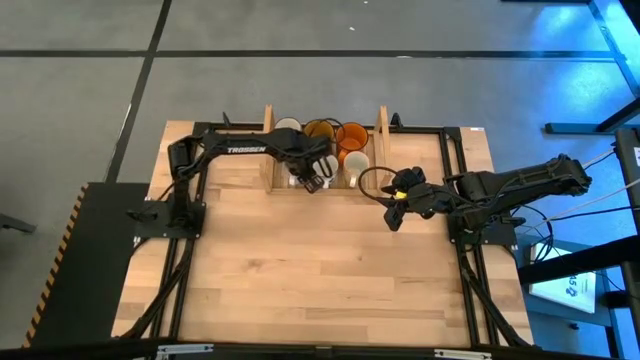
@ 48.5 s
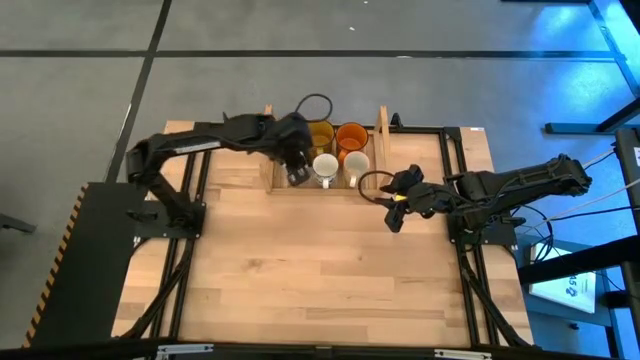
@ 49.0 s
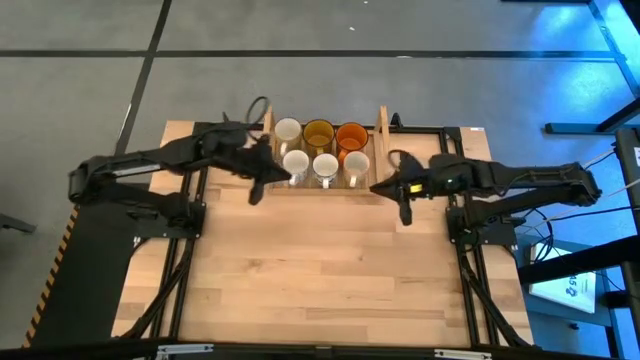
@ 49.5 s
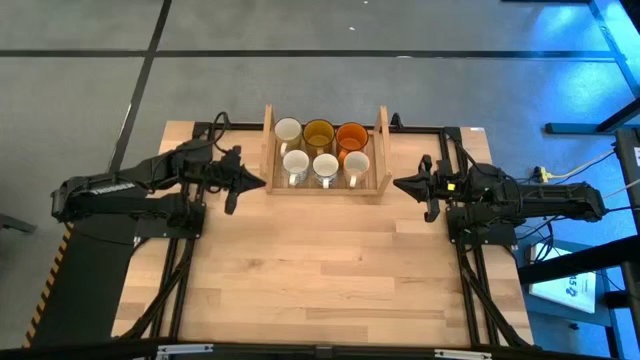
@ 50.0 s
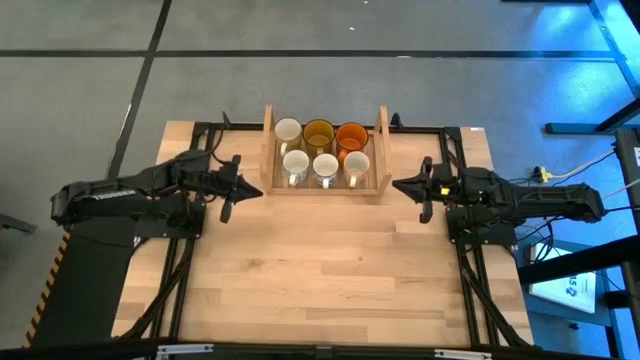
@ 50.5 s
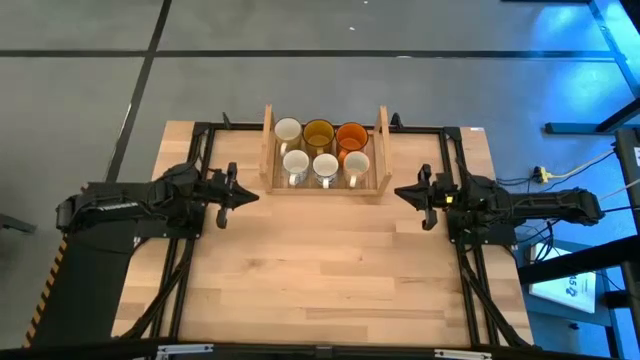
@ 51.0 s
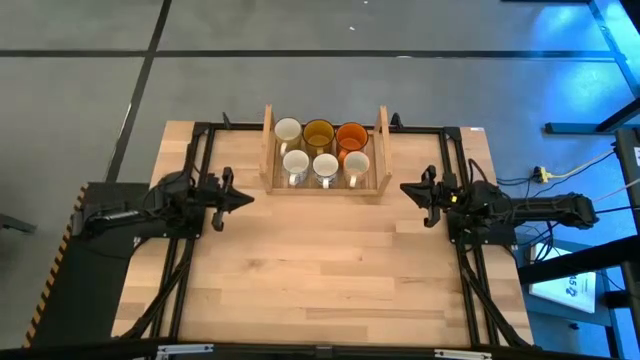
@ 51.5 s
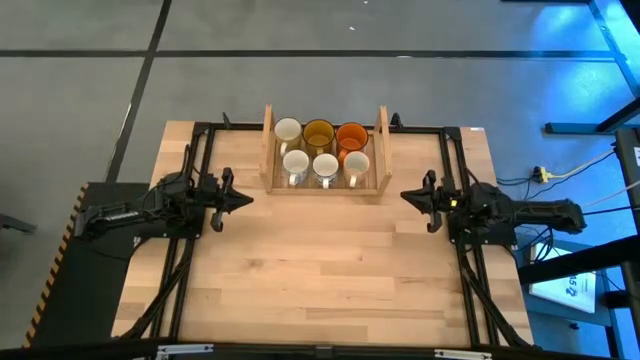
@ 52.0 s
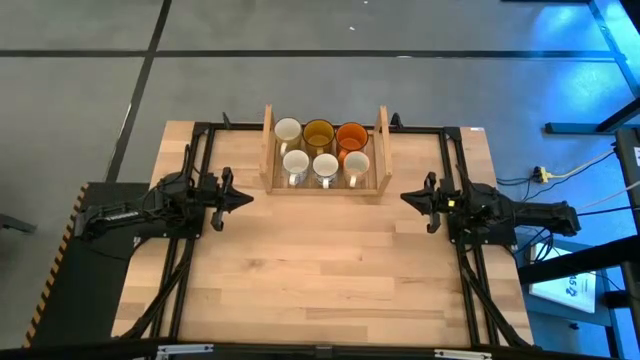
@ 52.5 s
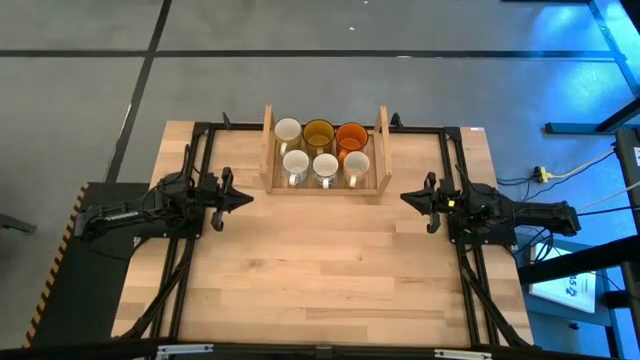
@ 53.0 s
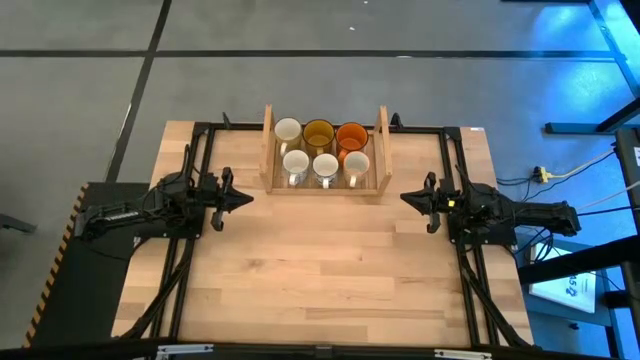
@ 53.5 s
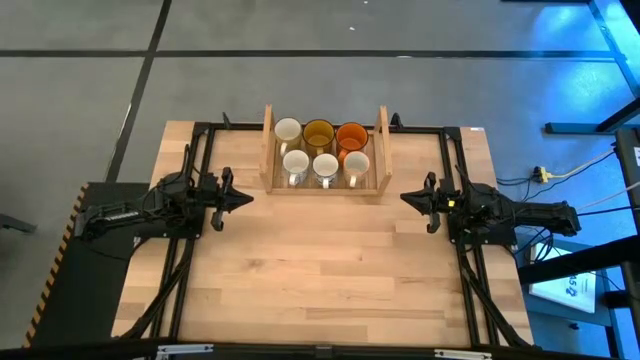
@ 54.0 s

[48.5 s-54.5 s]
Task: Place coffee mugs
Return to Home Position

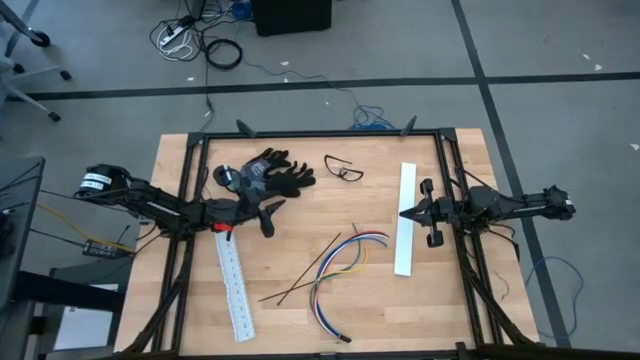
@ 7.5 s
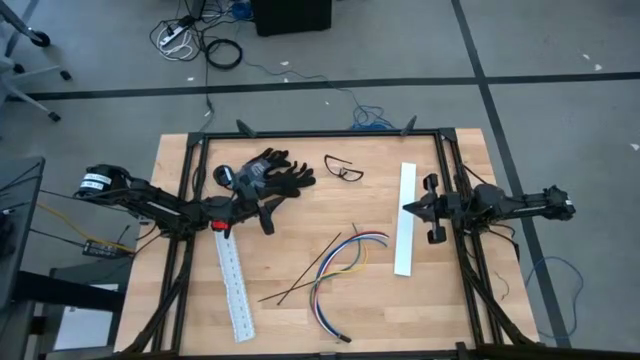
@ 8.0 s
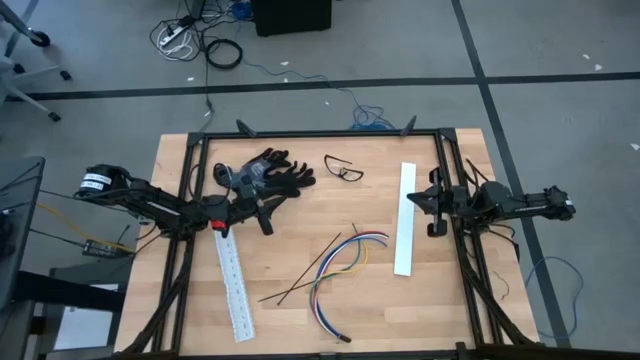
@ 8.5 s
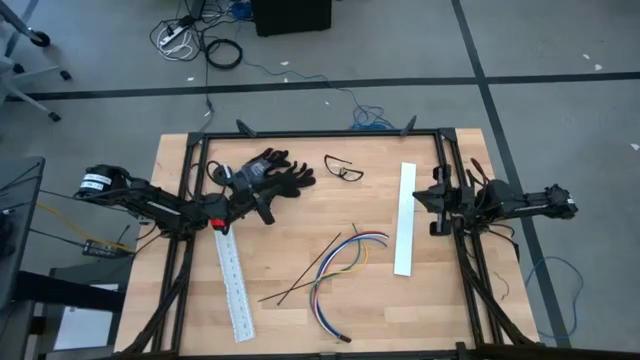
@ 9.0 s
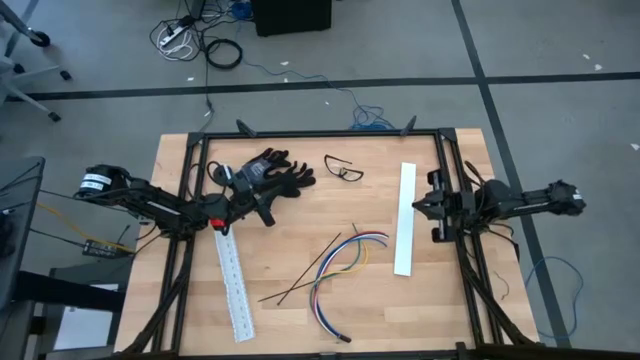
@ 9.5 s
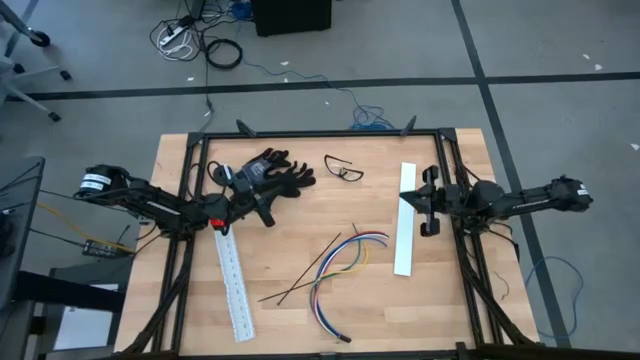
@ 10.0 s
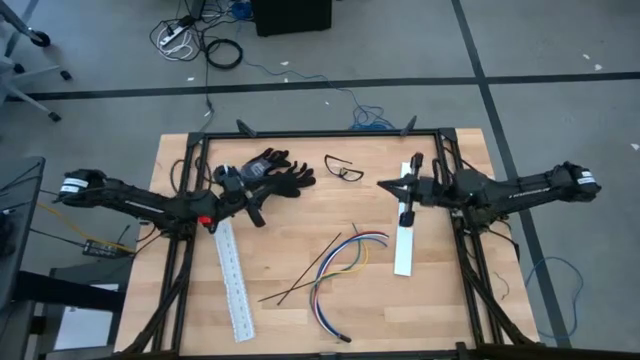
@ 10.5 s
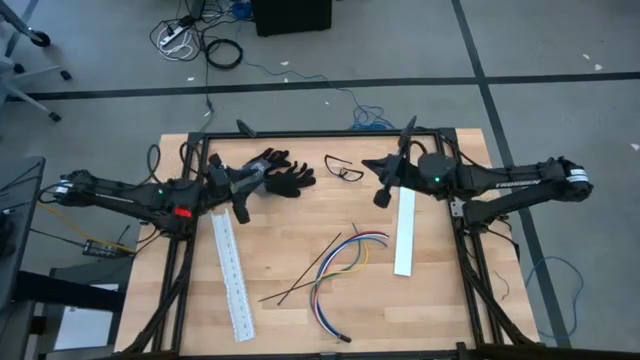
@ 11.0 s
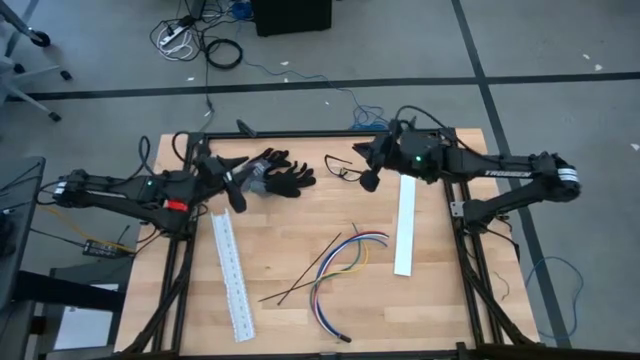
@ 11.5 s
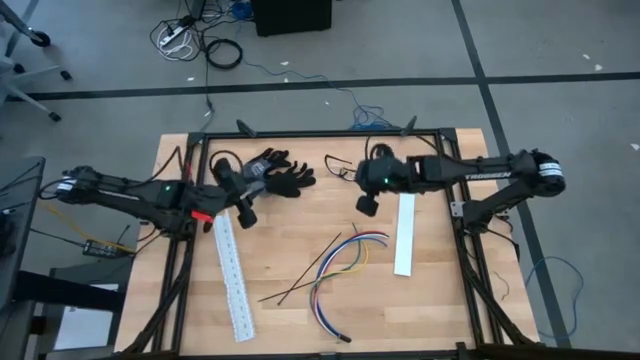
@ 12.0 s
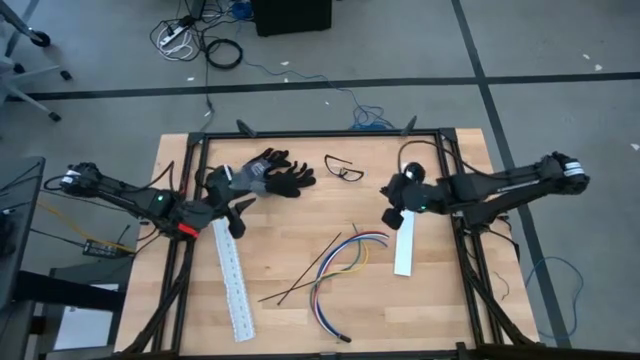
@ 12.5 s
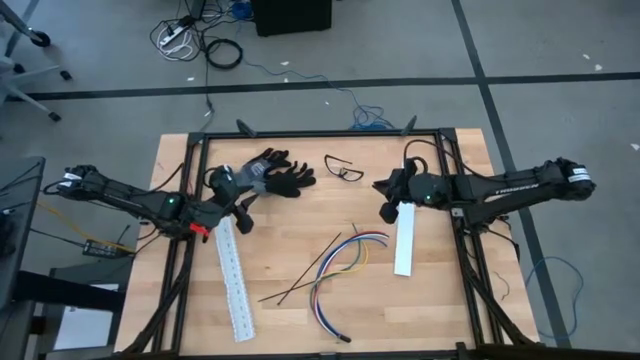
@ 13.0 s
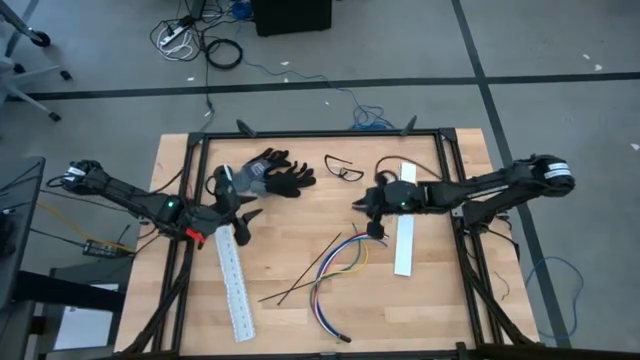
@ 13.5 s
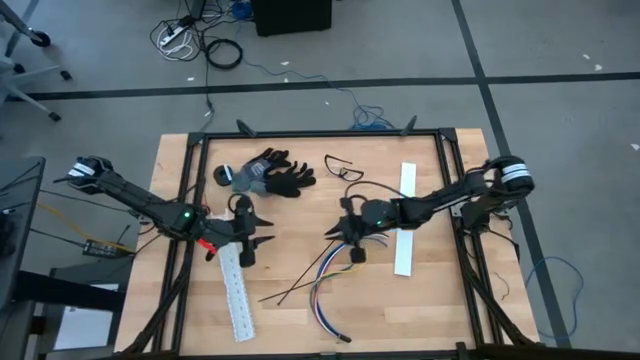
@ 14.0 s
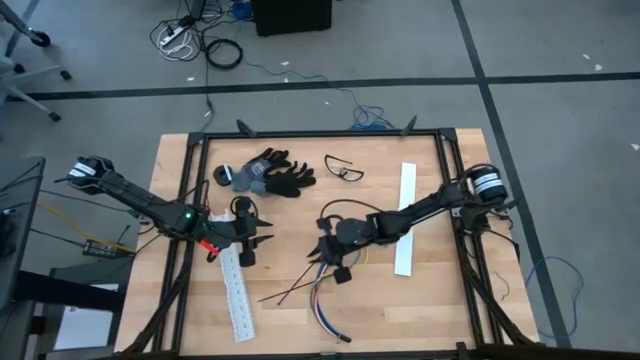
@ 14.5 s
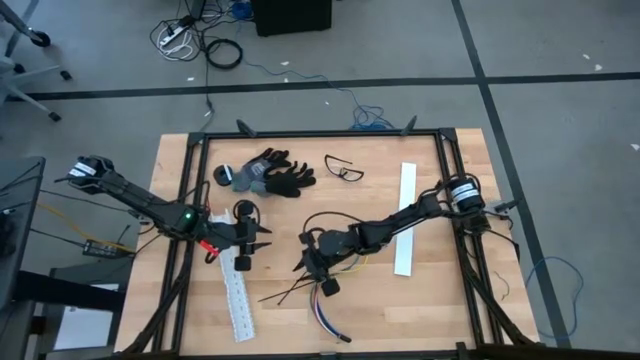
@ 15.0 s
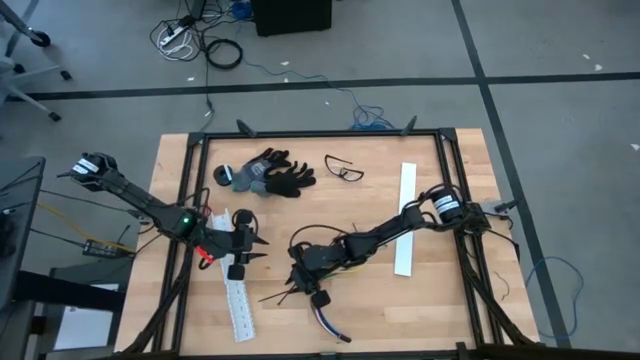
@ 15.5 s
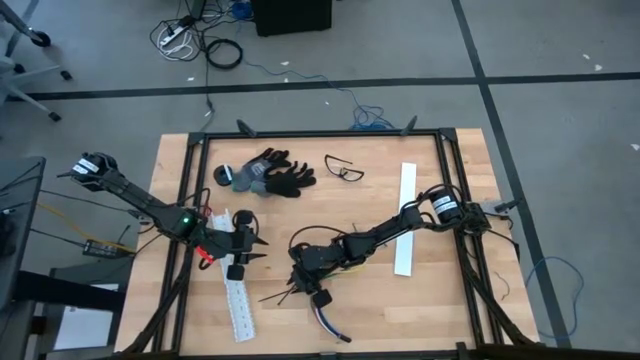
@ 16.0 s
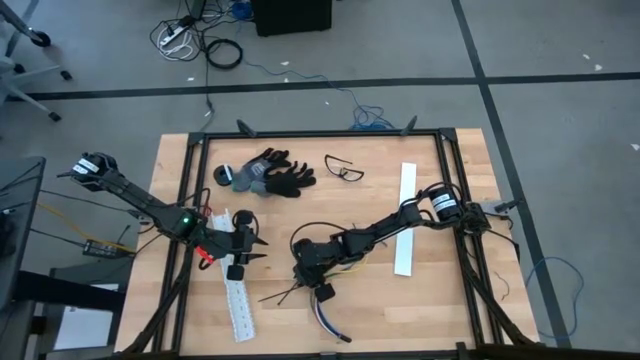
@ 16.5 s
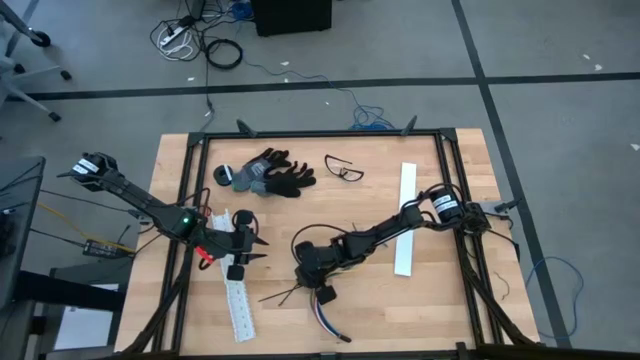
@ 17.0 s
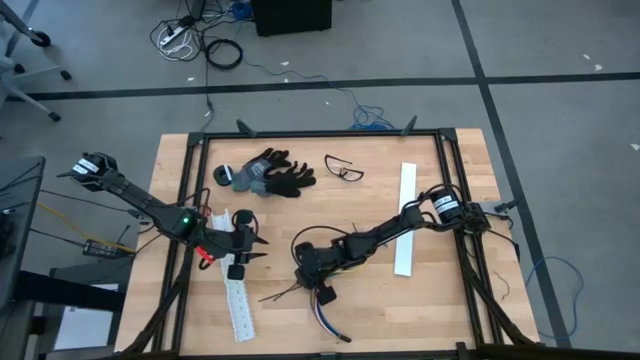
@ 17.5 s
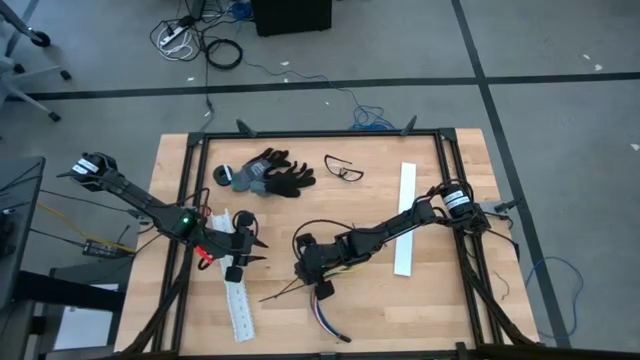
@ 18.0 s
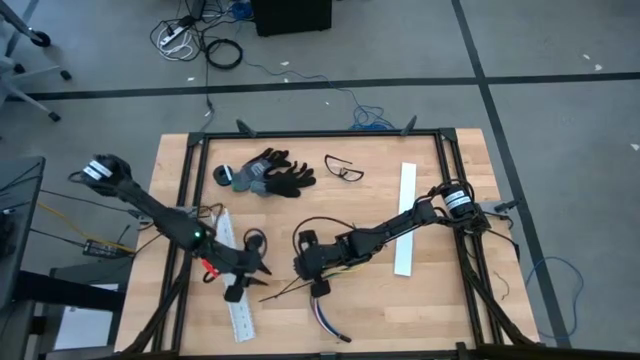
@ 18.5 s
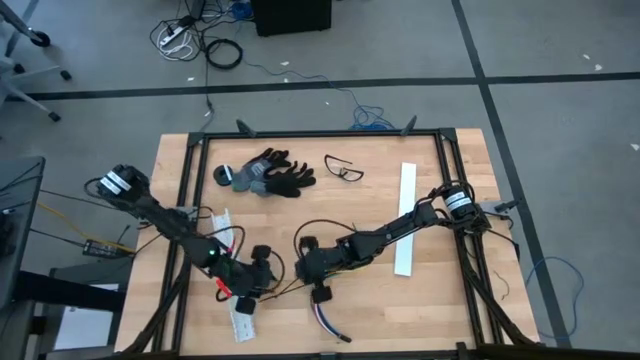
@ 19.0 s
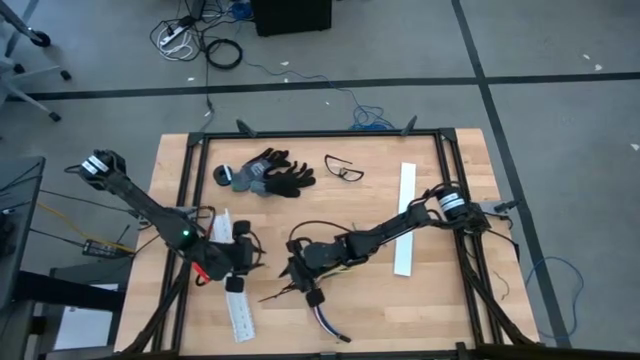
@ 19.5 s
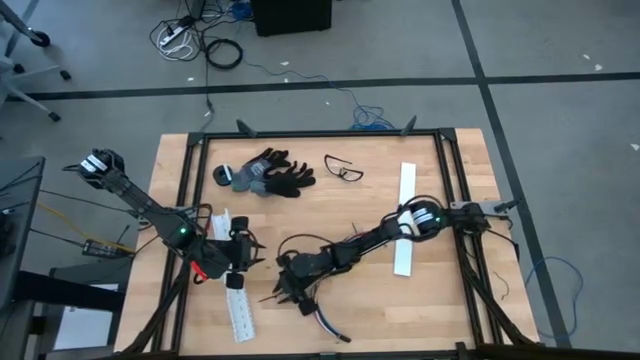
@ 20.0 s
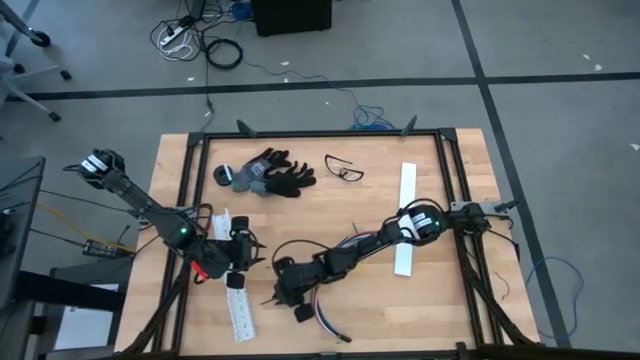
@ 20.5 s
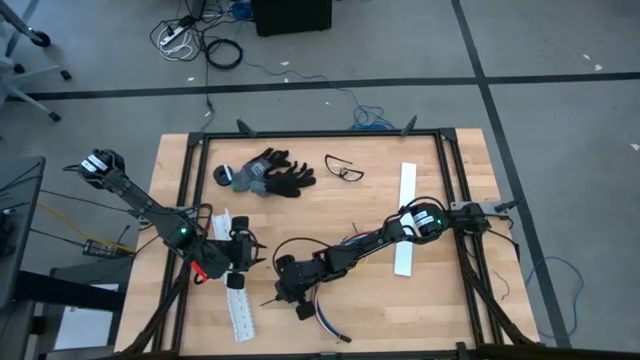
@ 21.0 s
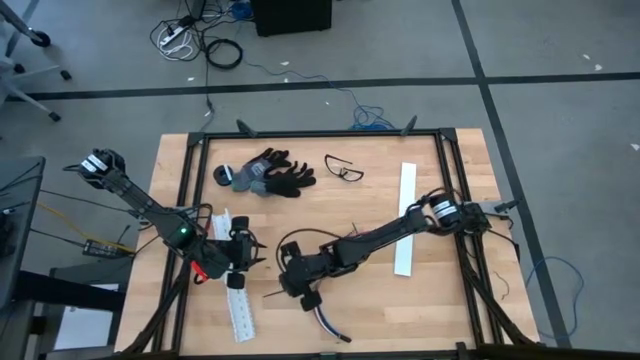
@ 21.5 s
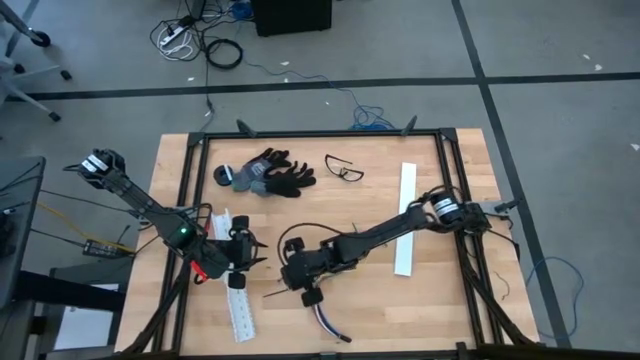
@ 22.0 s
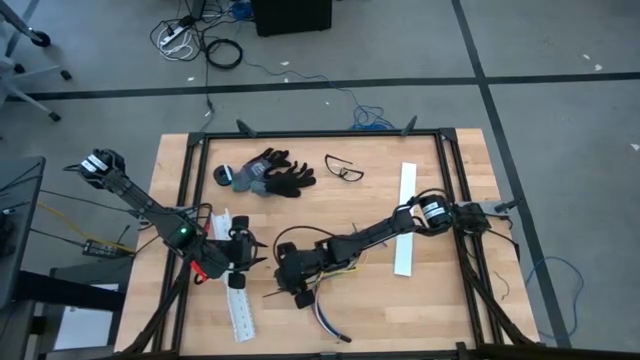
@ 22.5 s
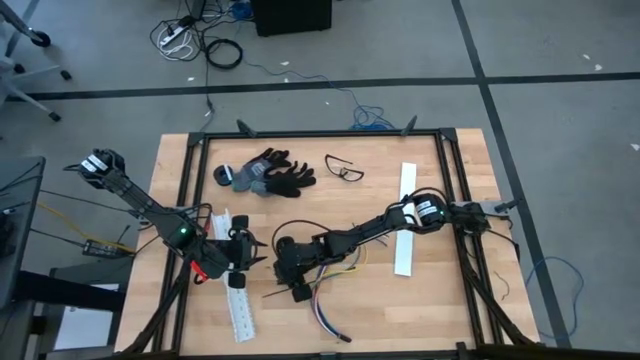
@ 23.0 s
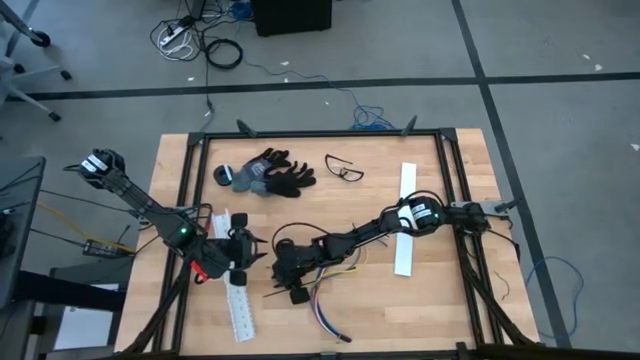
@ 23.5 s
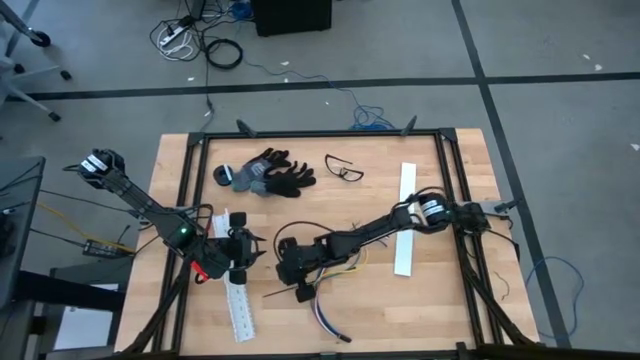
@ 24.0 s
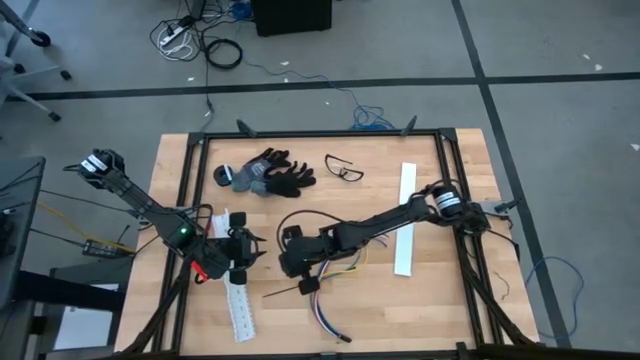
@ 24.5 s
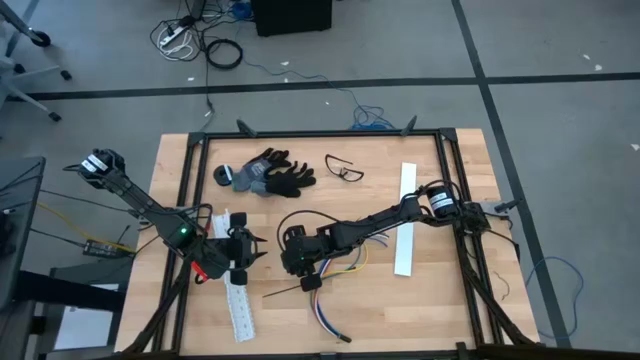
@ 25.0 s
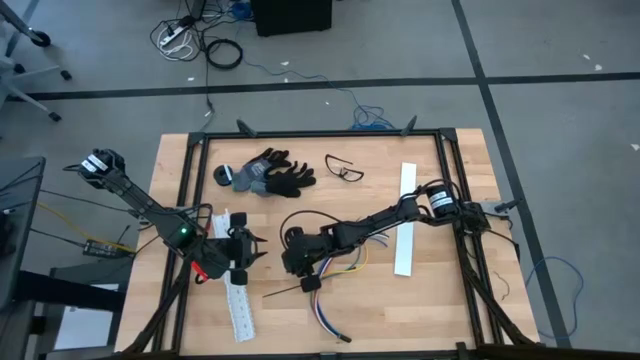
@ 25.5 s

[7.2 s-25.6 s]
Task: Ziptie cables
Insert the top black zip tie pointed tail end through the slot to form a loop
